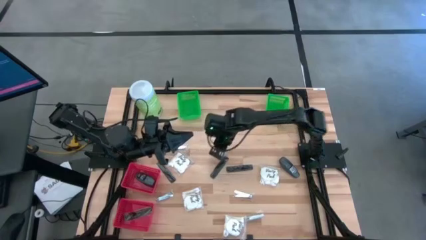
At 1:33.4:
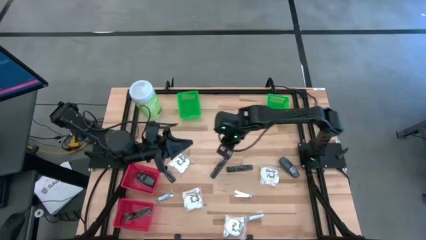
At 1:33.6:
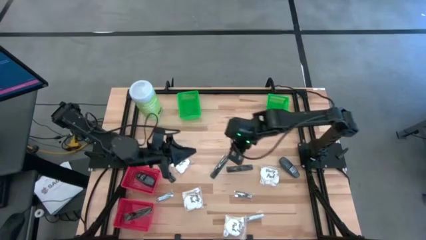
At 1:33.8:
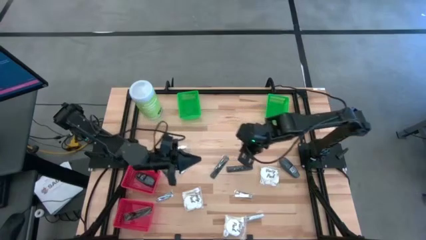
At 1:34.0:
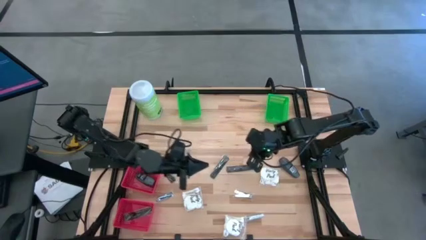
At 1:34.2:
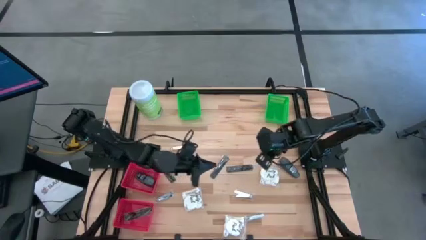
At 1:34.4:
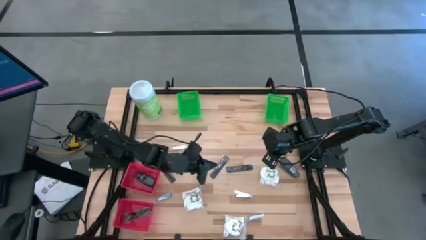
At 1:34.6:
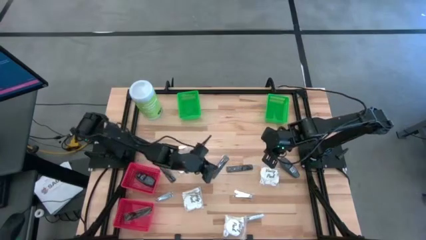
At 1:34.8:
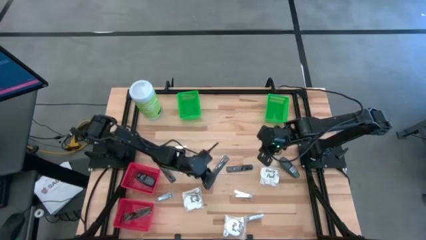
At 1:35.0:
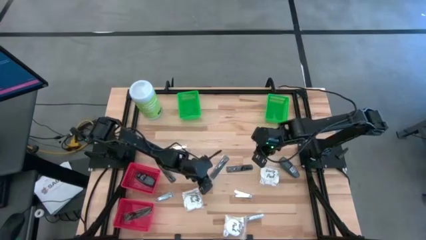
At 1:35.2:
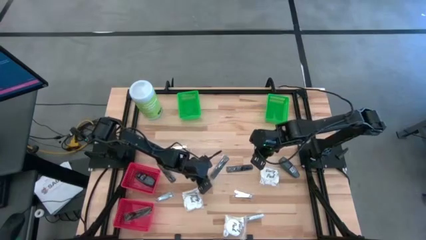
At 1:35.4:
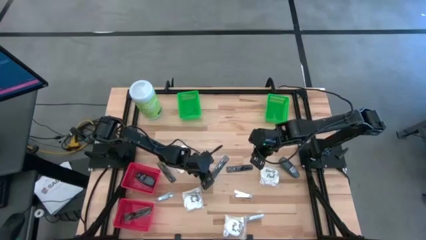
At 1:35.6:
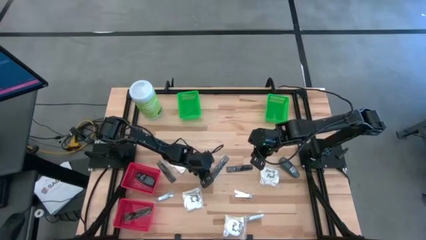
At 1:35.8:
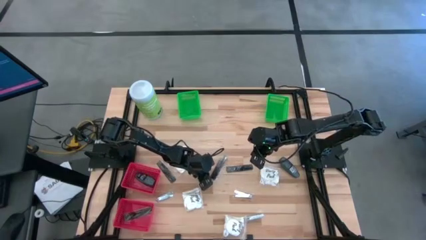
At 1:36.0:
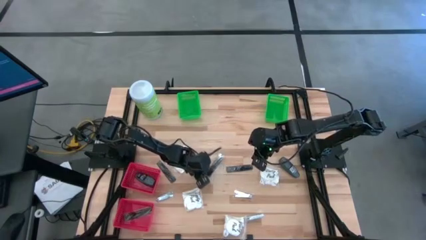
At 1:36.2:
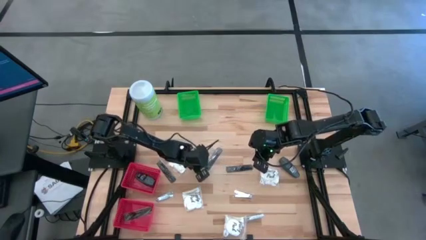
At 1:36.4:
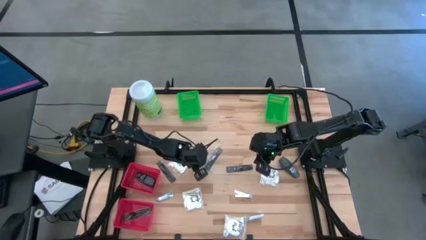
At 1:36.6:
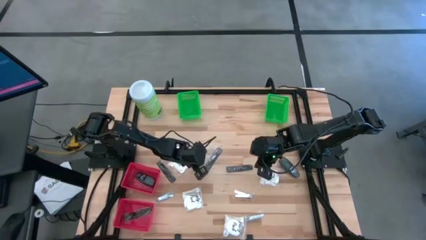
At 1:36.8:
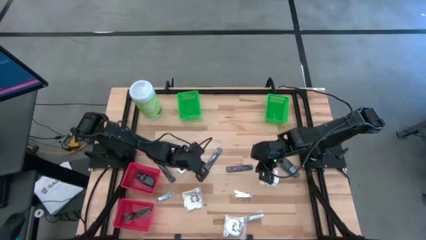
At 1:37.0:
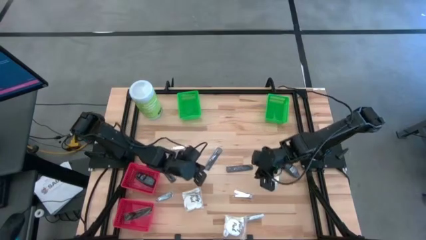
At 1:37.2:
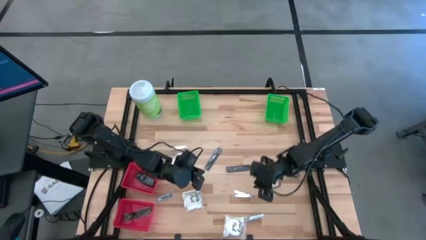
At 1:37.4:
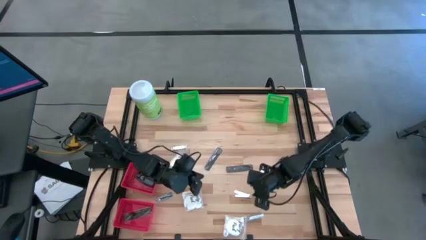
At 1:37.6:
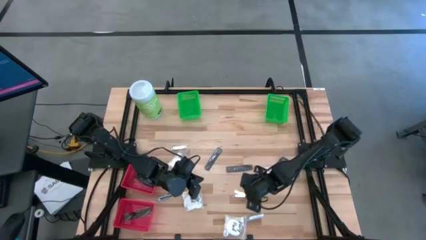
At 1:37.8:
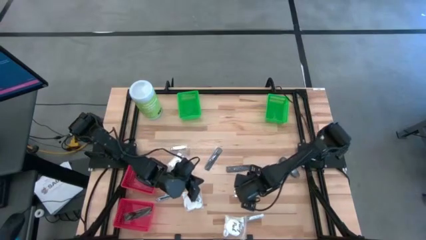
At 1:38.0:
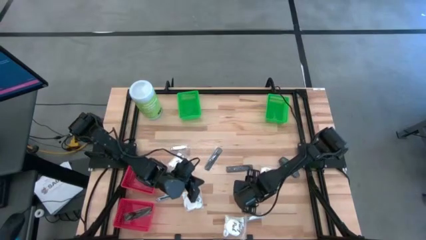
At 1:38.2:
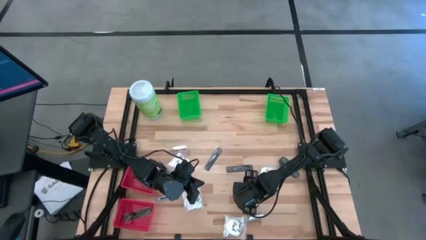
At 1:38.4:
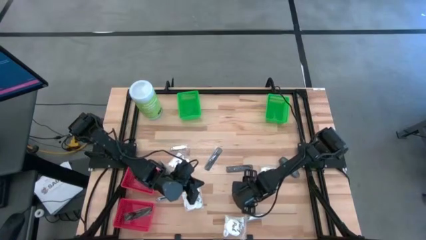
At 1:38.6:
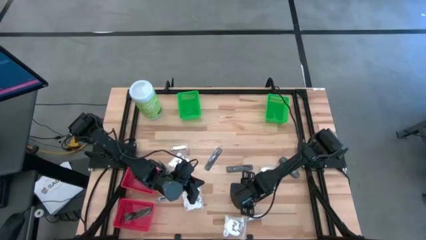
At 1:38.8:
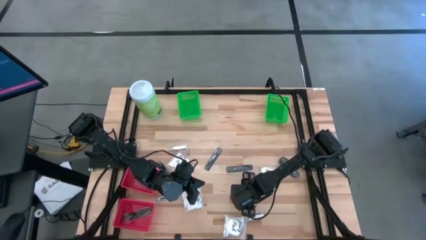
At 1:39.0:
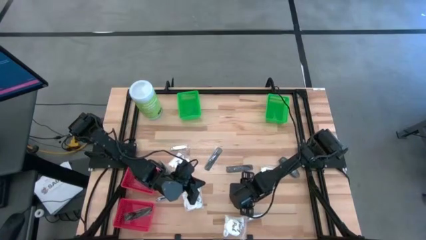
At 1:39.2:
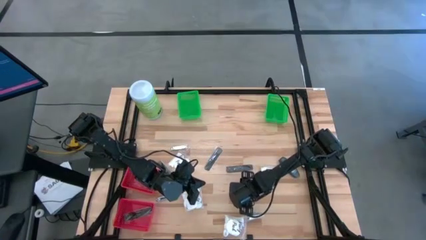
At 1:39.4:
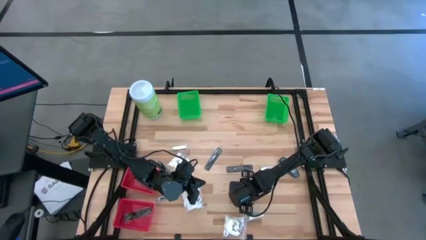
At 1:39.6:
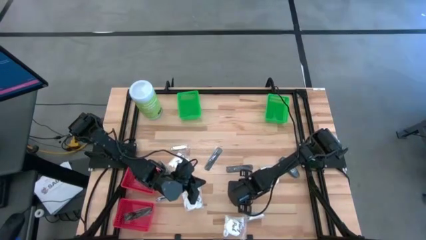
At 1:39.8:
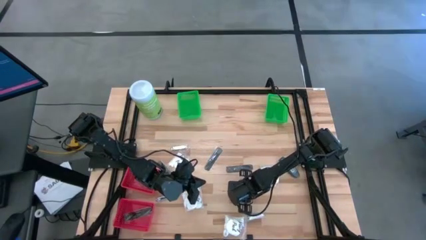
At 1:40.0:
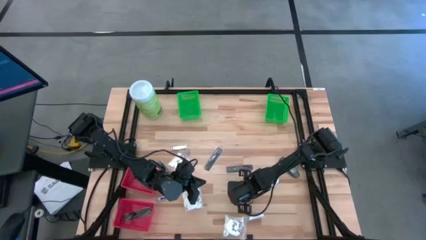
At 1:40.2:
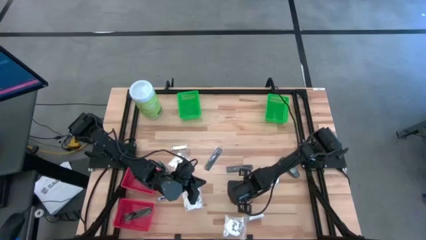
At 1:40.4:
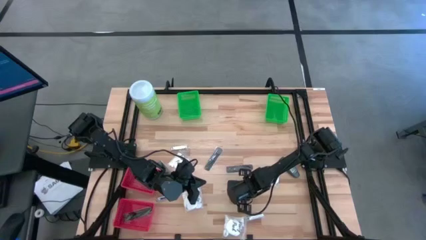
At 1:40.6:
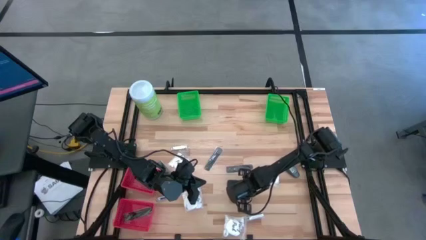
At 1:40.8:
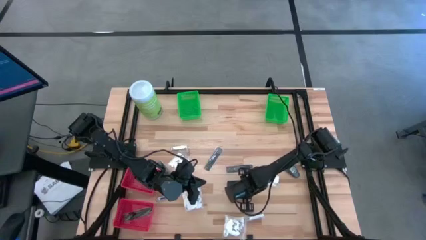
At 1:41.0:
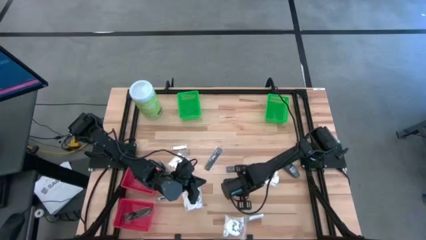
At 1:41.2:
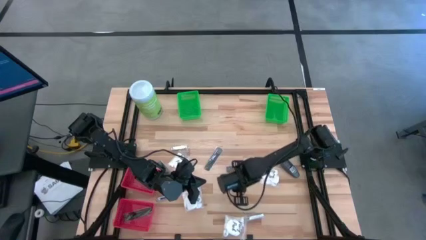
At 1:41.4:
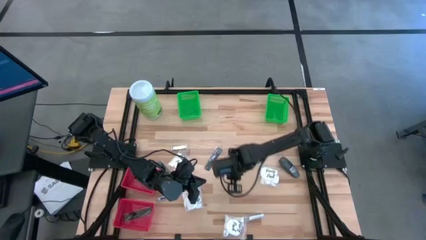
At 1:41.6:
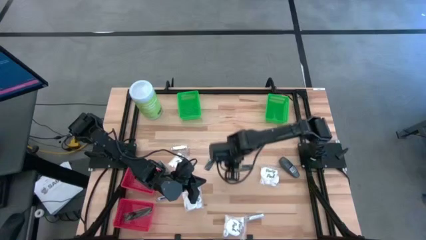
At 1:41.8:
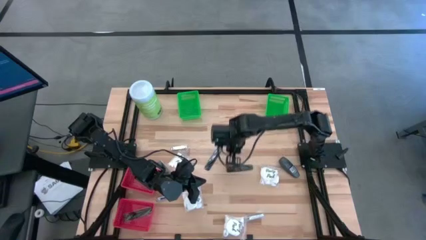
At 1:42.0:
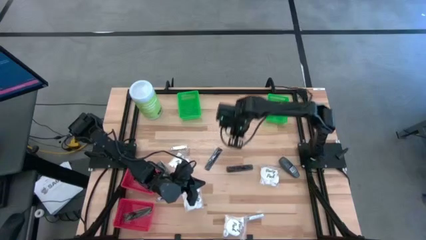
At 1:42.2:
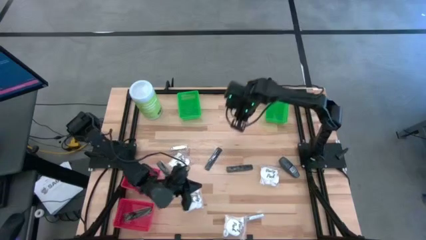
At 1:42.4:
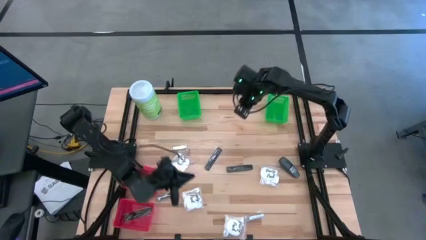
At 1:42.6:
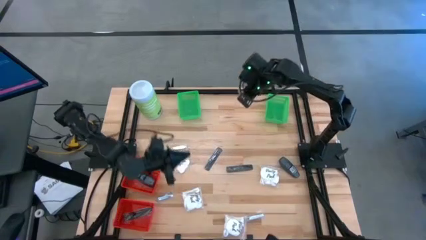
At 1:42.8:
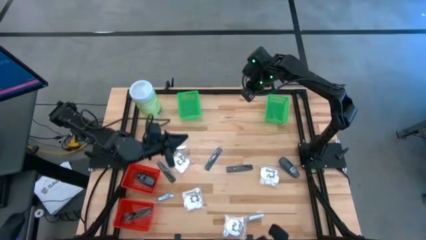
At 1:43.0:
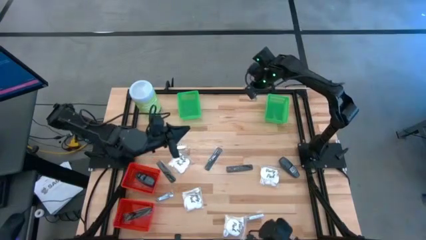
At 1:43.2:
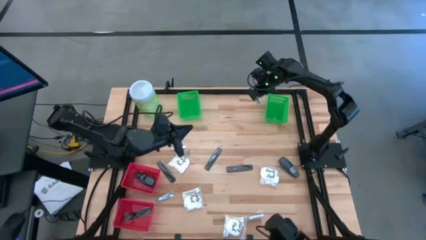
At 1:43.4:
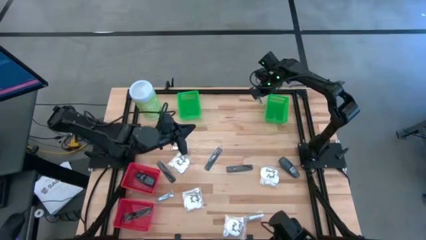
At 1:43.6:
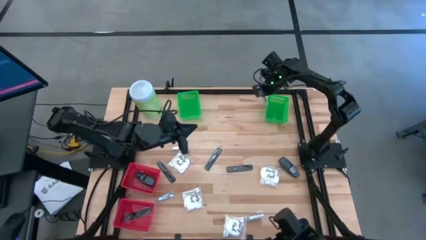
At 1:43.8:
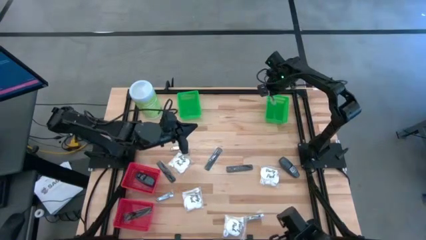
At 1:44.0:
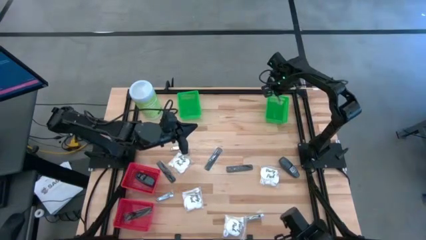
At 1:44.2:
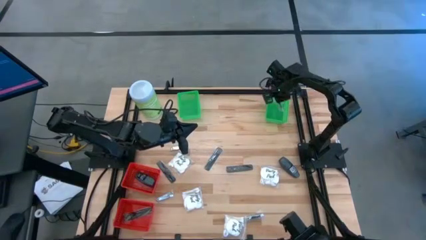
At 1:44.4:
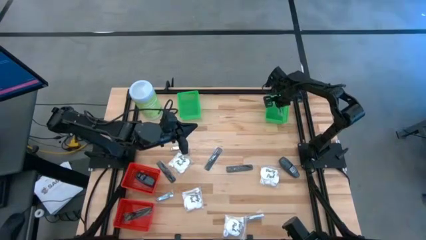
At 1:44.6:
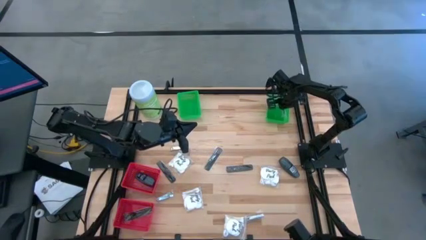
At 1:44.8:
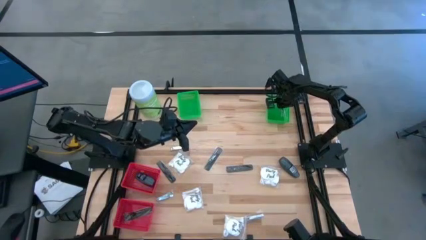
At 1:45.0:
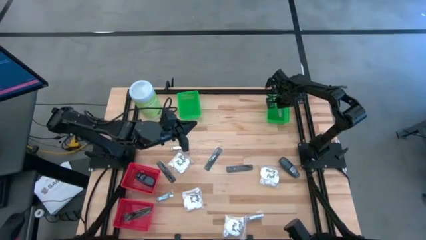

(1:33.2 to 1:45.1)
Task: Pick & Place Travel size toiletries
Put the silver nail cutter into the top right green basket

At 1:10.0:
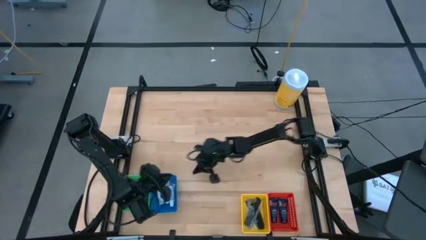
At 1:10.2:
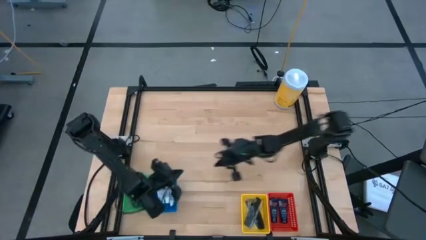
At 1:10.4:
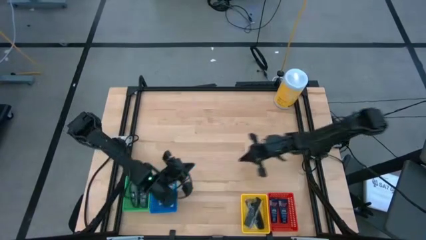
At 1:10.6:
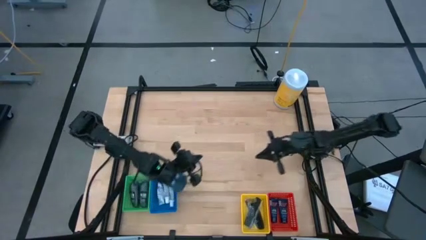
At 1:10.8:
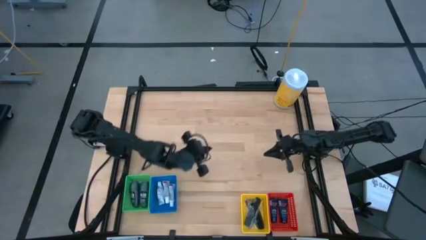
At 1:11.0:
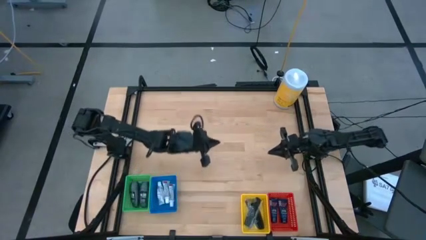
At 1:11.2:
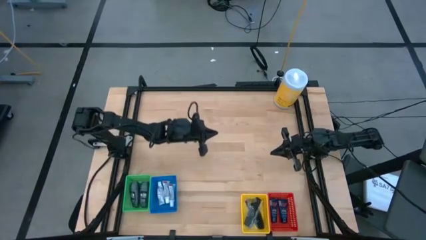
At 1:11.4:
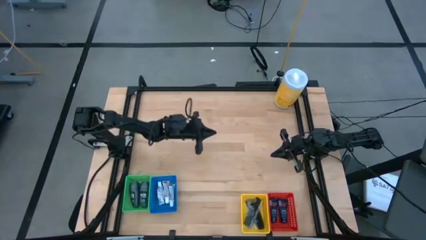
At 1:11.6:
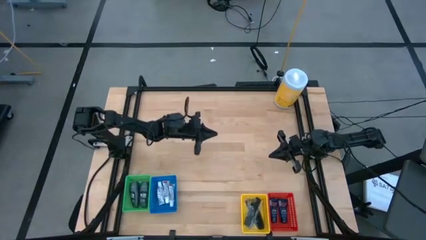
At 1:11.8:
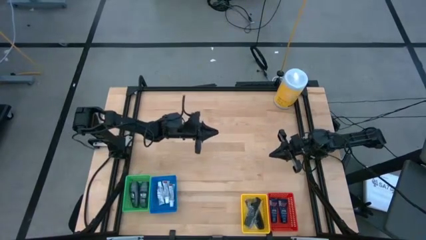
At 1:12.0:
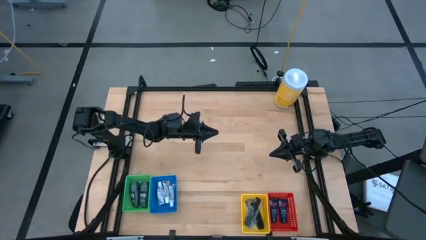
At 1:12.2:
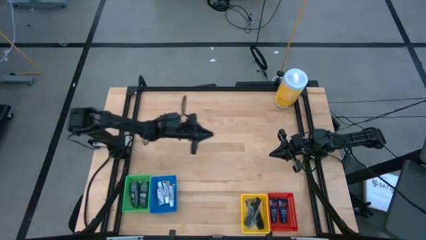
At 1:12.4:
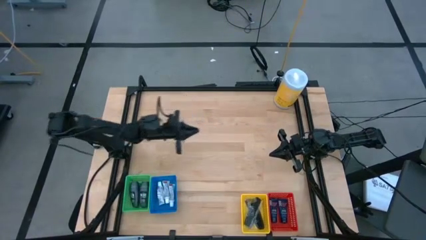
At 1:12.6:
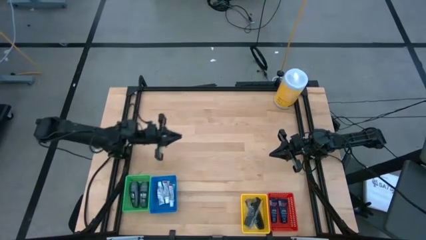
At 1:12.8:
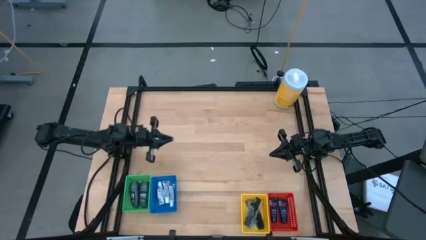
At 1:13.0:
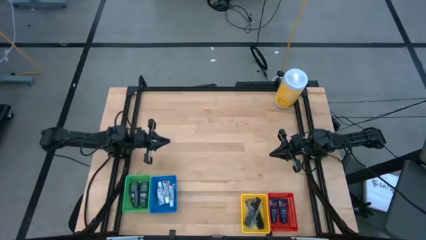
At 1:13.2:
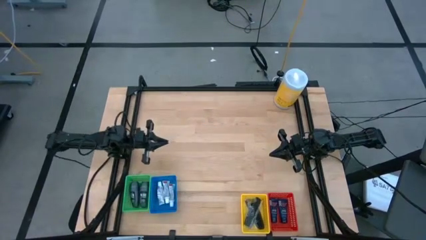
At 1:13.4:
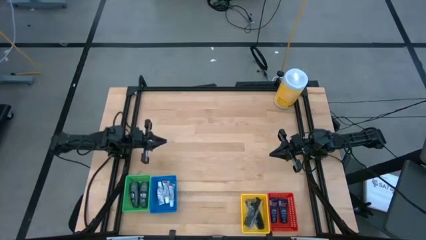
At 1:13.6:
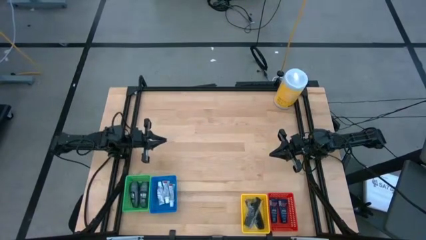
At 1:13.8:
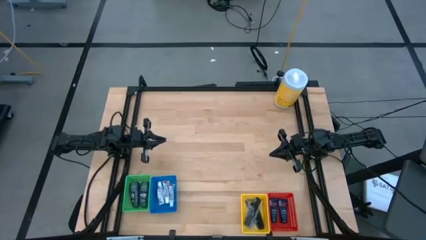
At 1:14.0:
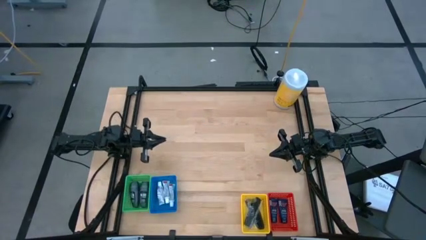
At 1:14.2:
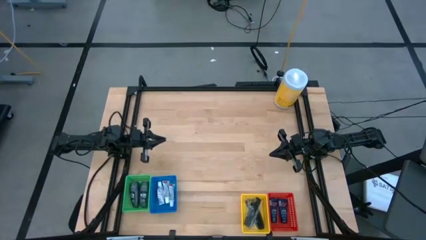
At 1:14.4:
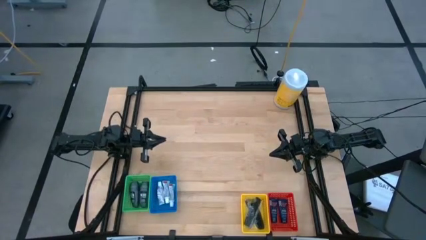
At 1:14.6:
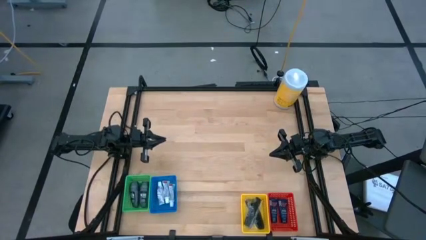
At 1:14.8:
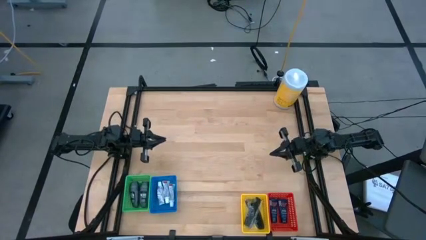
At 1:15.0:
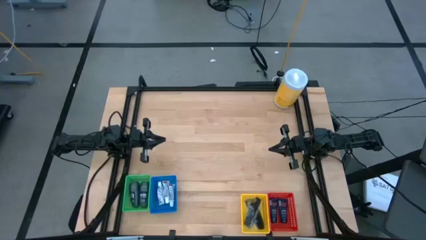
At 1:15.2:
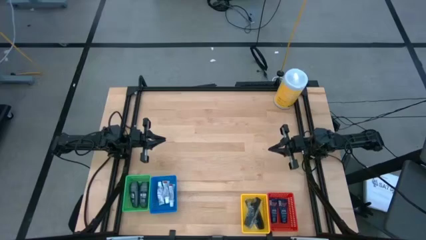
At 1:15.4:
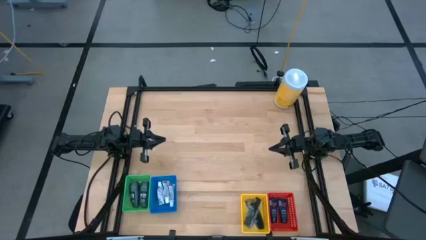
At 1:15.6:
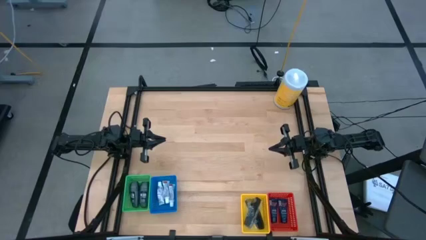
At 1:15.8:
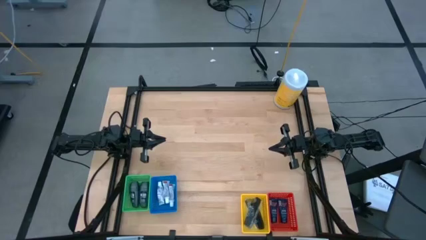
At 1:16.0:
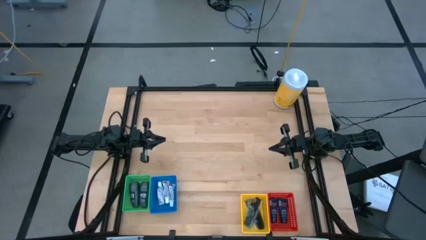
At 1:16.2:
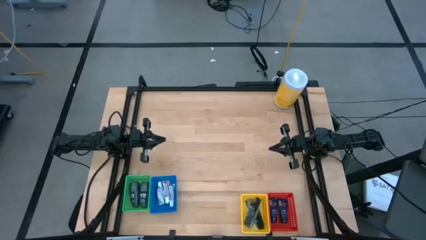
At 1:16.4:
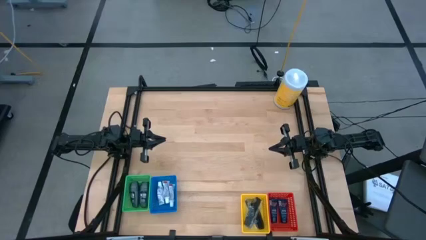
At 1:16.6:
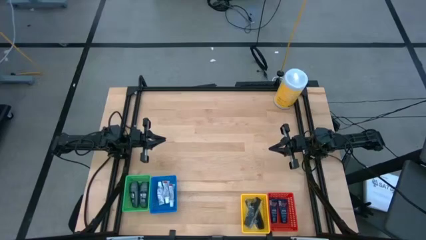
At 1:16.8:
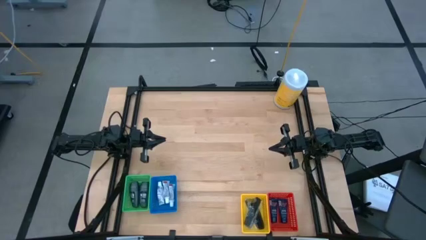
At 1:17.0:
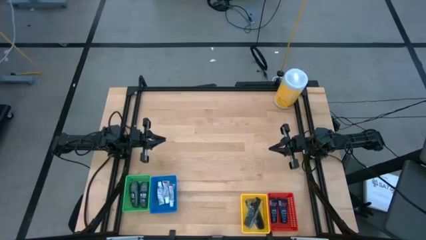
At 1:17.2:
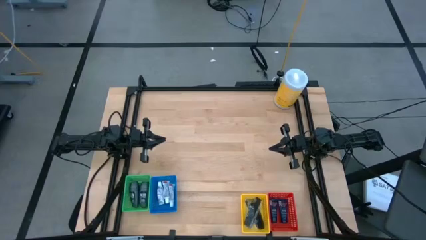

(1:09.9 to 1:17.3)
Task: Pick & Place Travel size toiletries
Return to Home Position
